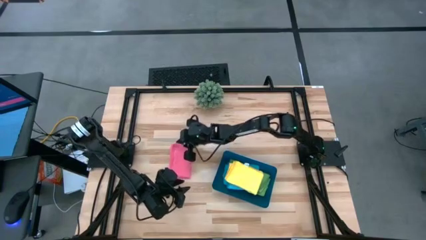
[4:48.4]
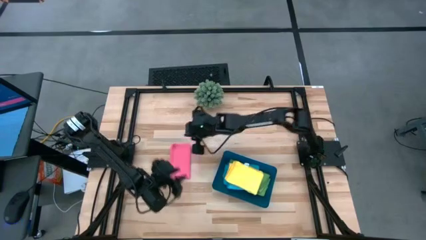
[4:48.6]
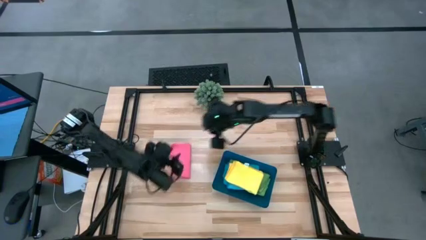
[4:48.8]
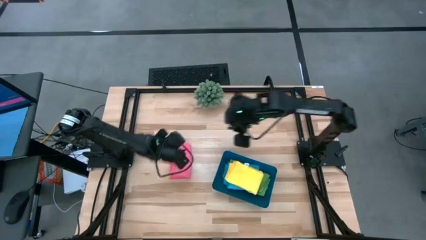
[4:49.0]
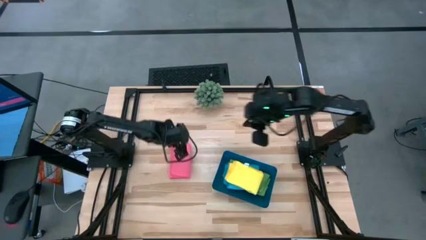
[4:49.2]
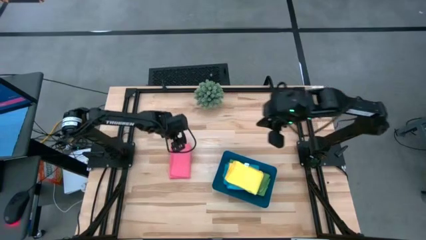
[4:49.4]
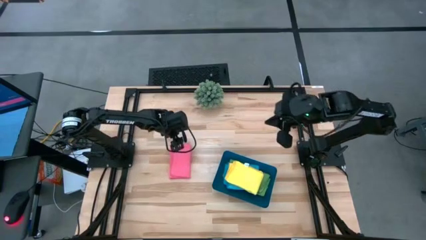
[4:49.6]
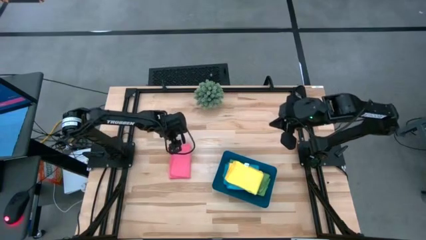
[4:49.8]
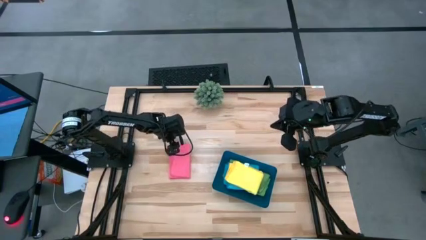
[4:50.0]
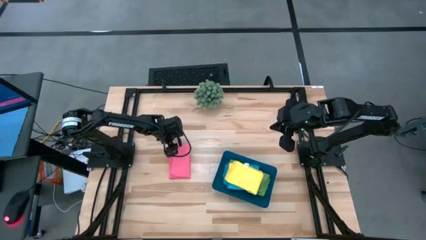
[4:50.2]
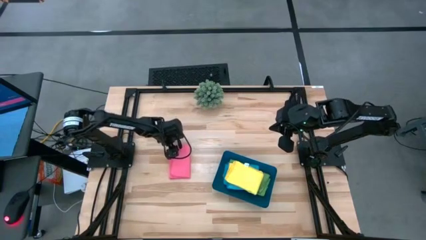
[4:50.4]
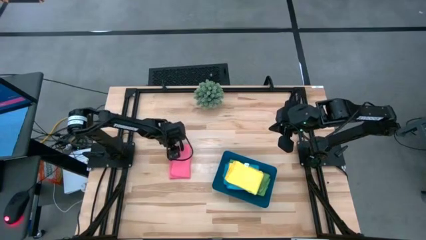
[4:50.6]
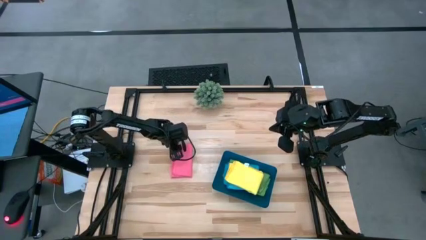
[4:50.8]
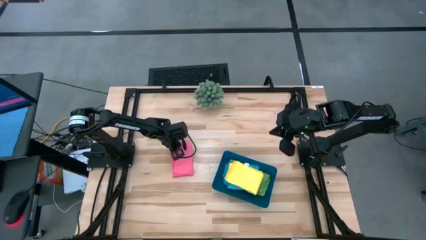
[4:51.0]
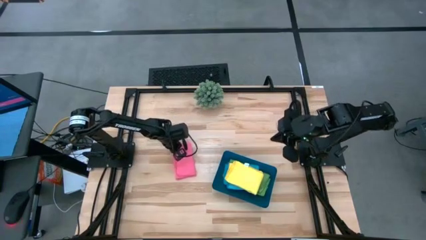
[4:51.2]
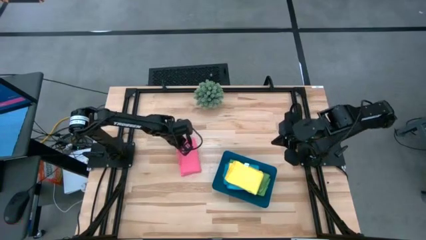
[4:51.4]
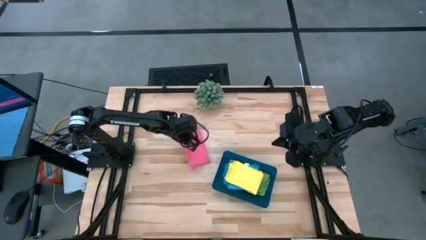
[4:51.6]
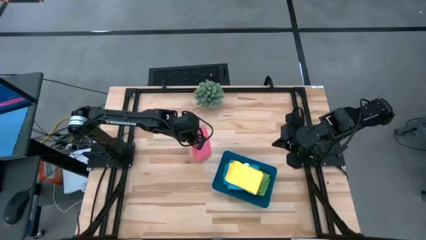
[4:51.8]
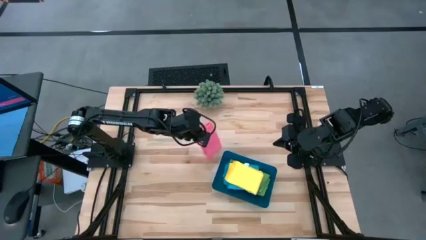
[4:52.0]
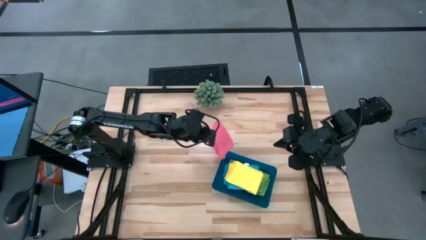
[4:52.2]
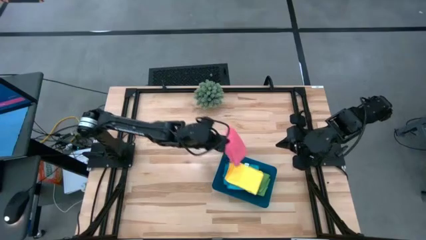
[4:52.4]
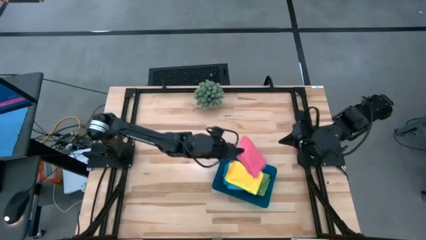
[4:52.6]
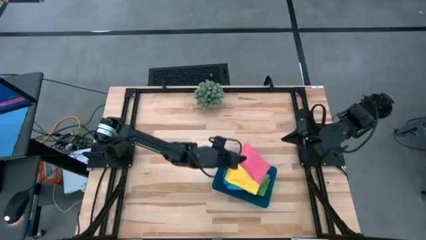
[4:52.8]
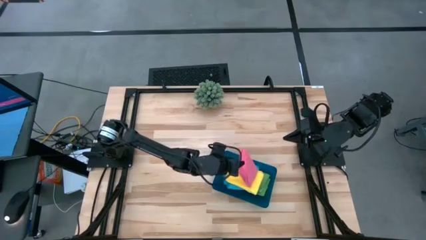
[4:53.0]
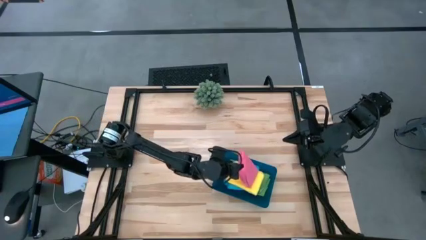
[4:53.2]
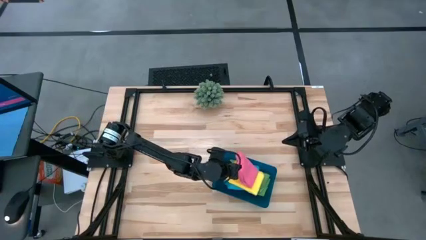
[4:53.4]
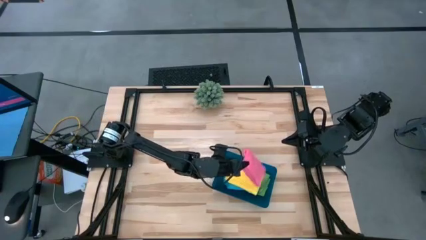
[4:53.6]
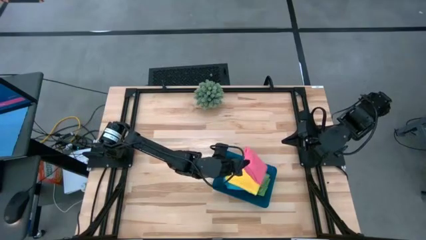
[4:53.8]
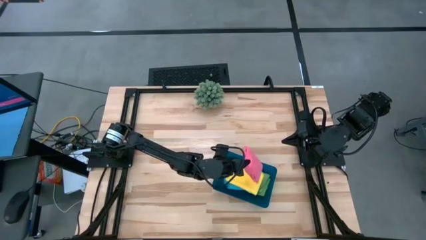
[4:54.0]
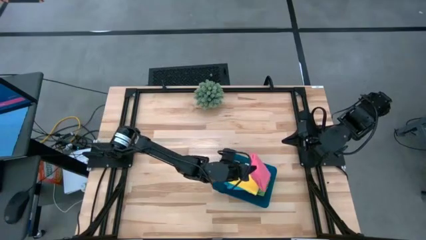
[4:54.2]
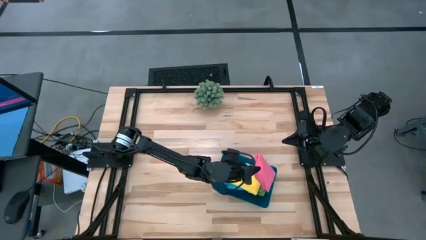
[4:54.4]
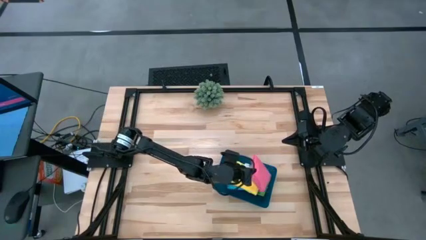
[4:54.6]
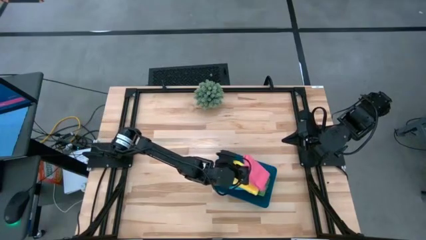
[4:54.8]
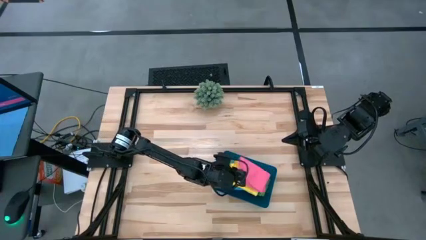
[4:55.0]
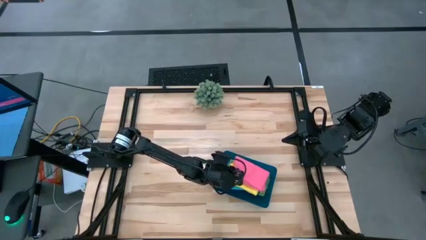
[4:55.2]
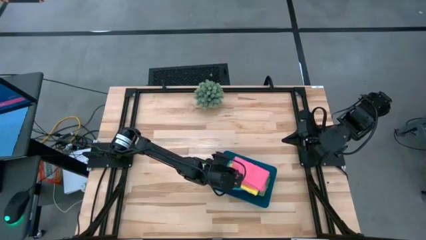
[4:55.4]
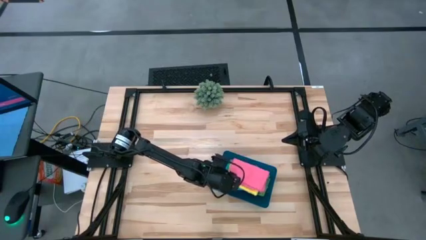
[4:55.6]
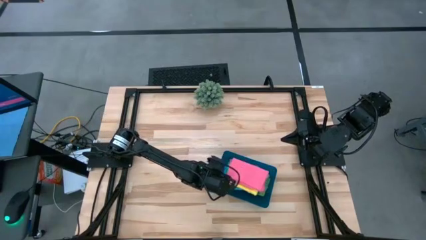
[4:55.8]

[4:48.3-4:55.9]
Task: Fold microfiber towels
Stack the folded pink microfiber cloth into the blue bin

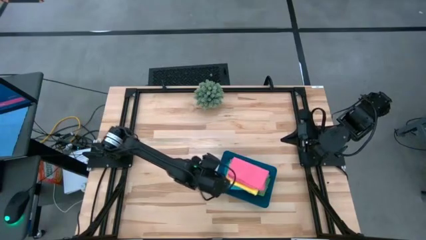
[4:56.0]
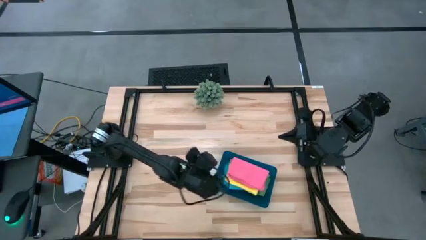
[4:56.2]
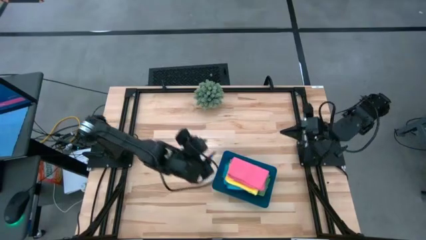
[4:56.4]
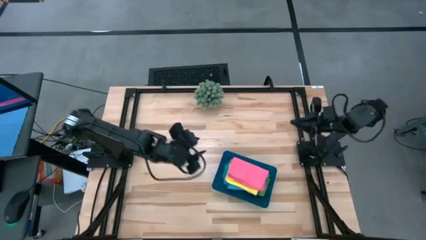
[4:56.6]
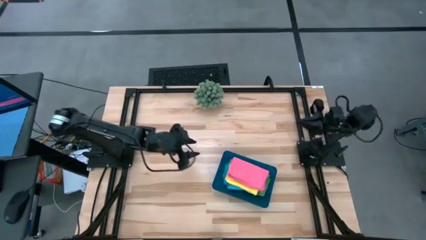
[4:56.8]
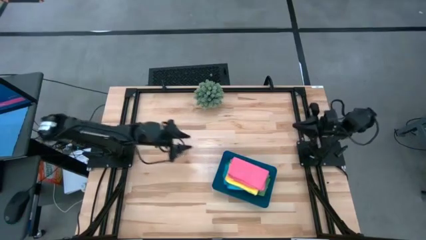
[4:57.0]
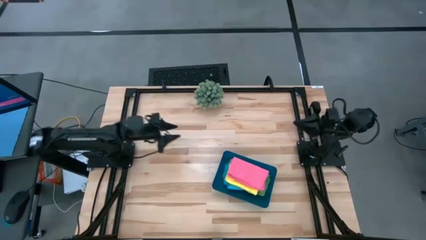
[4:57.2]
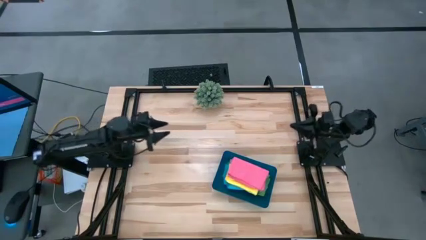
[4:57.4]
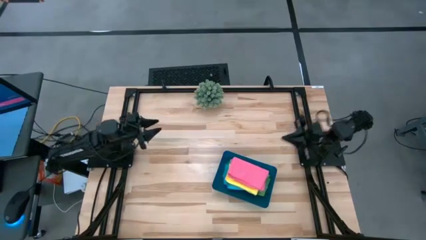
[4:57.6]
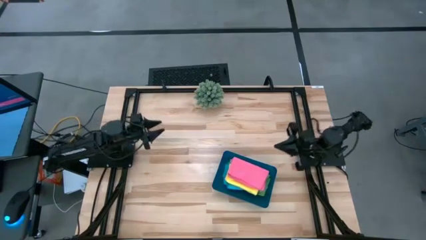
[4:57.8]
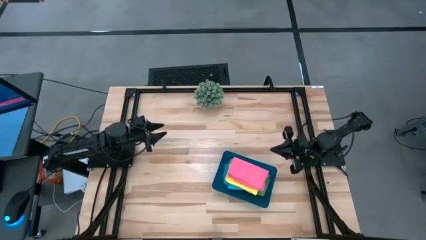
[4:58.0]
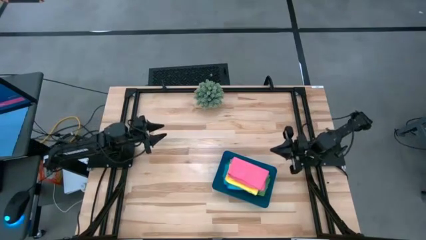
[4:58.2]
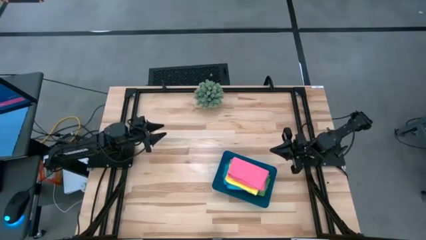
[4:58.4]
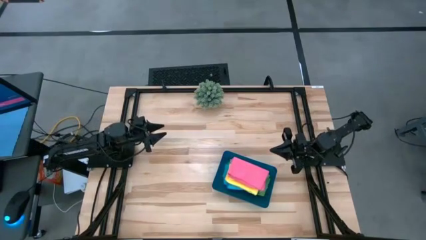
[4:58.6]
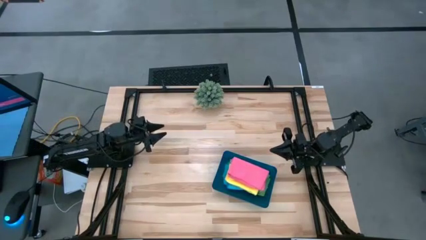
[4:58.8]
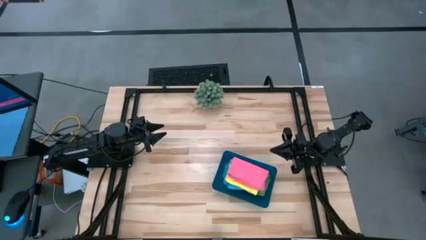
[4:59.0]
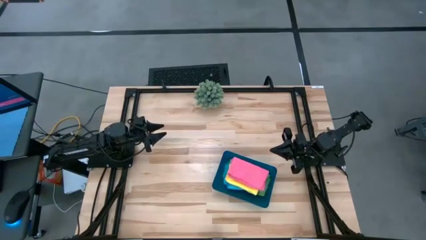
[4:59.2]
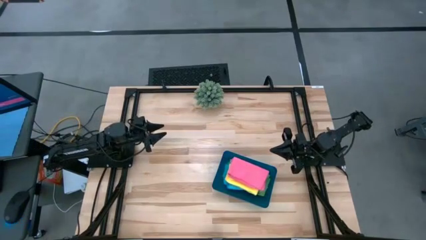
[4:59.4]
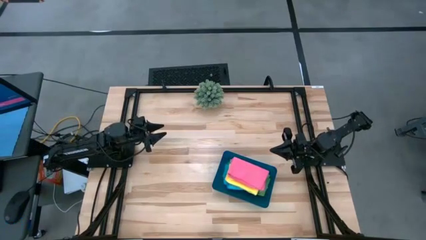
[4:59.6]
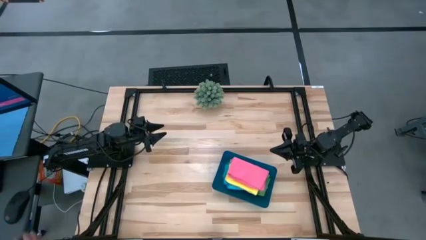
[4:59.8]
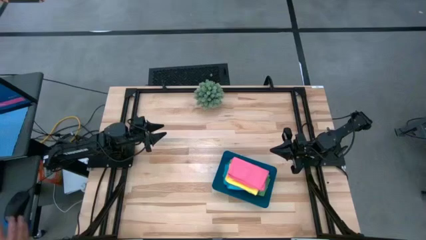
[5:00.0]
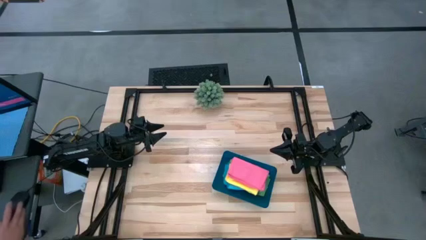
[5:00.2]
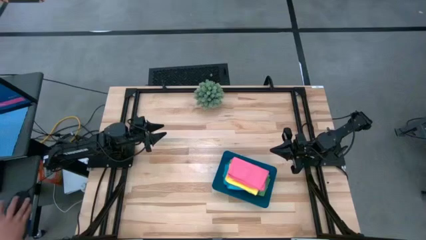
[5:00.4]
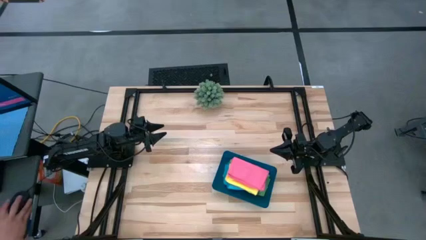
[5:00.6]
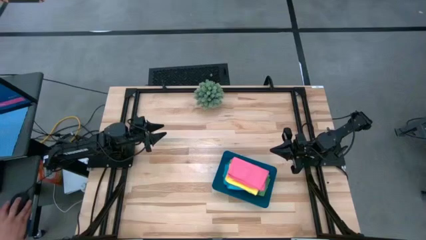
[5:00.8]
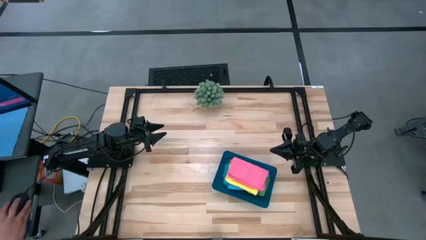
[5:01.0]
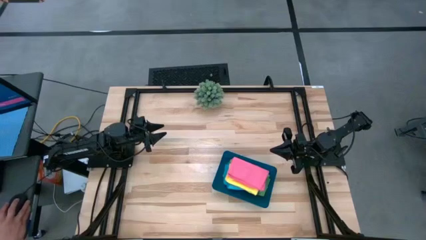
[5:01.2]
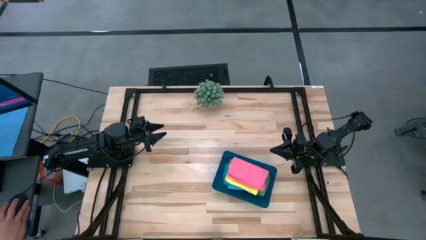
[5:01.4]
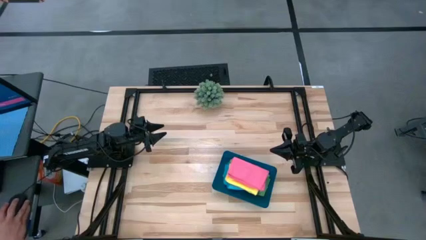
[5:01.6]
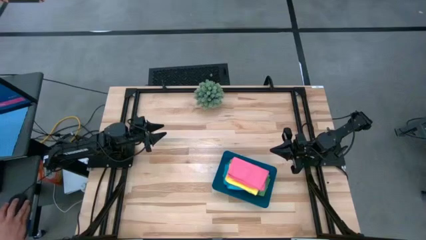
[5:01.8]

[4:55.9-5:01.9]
Return to Home Position

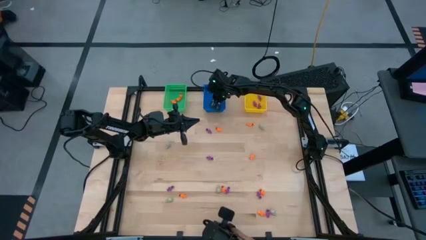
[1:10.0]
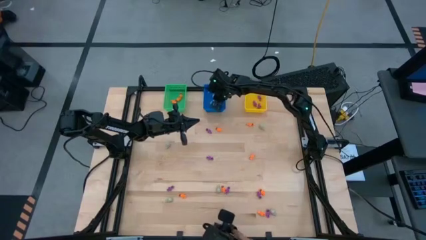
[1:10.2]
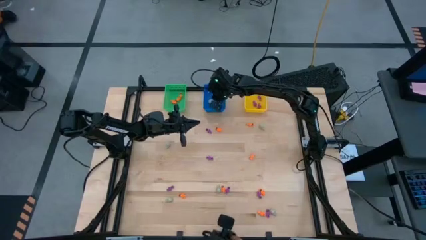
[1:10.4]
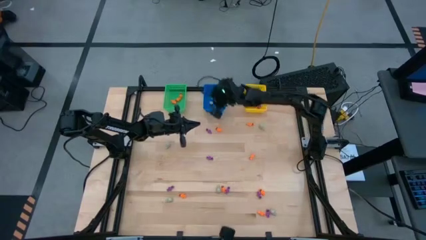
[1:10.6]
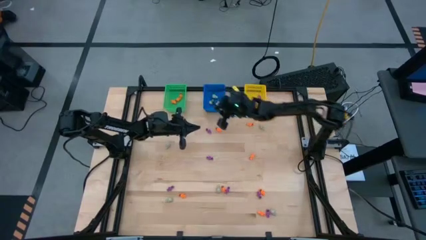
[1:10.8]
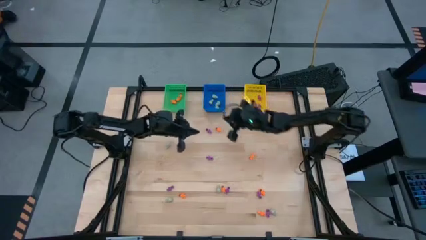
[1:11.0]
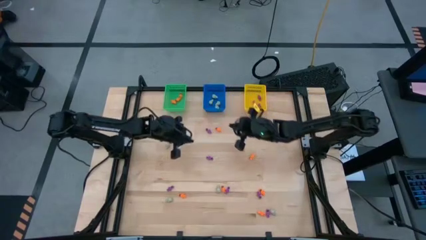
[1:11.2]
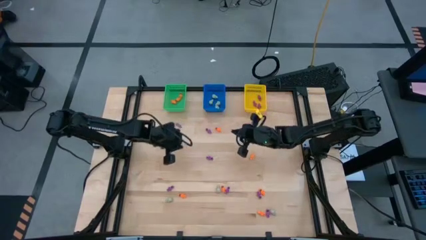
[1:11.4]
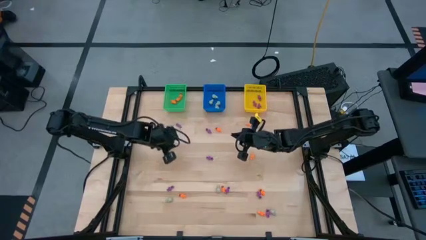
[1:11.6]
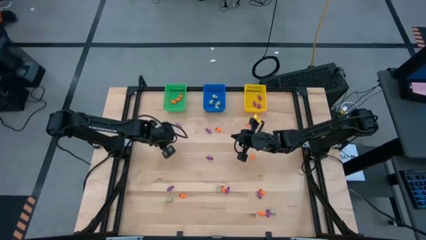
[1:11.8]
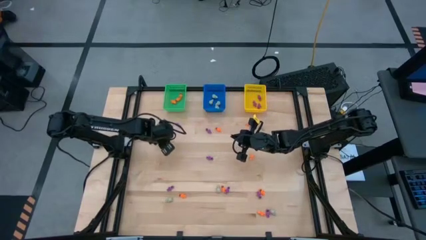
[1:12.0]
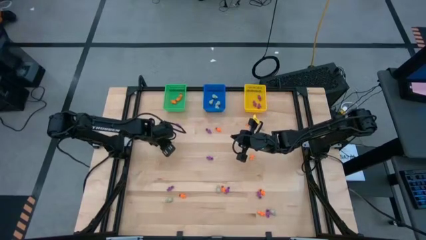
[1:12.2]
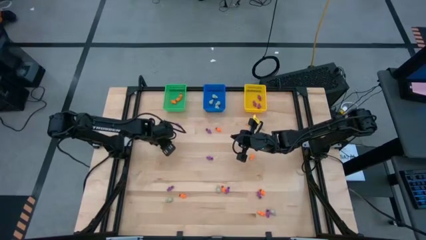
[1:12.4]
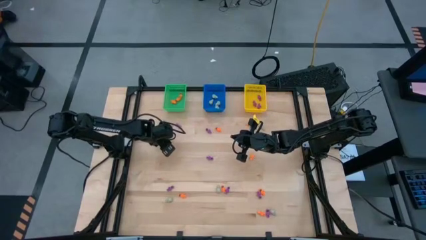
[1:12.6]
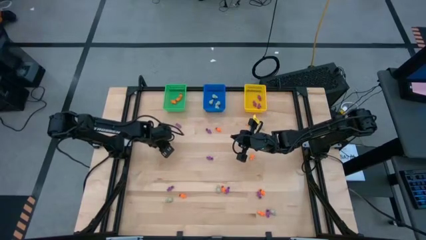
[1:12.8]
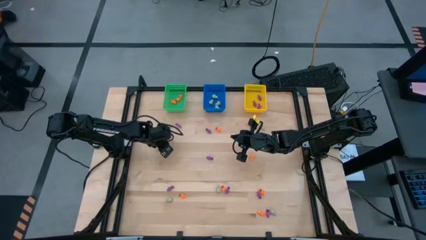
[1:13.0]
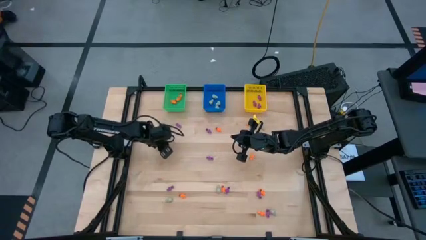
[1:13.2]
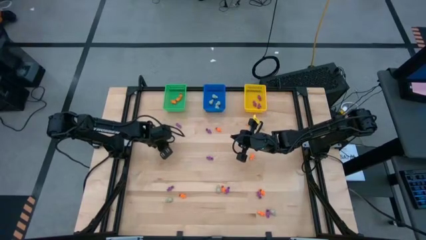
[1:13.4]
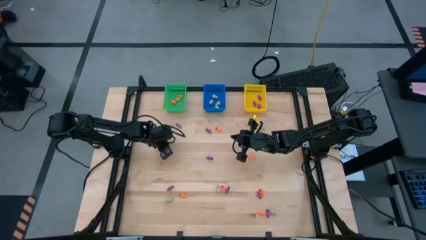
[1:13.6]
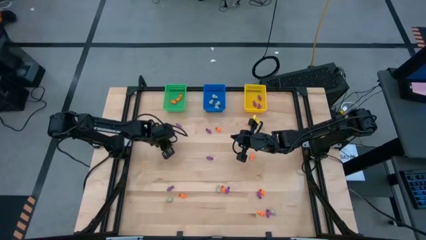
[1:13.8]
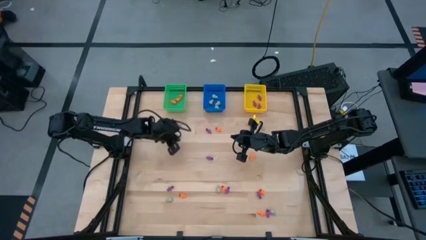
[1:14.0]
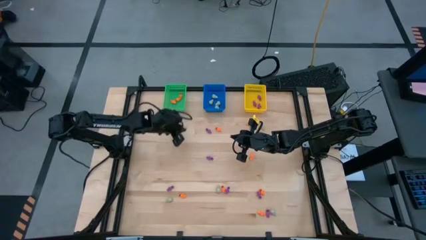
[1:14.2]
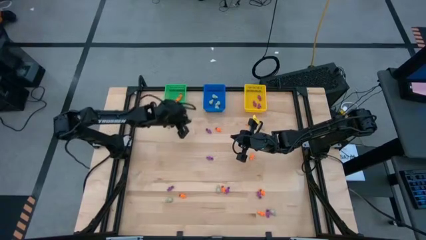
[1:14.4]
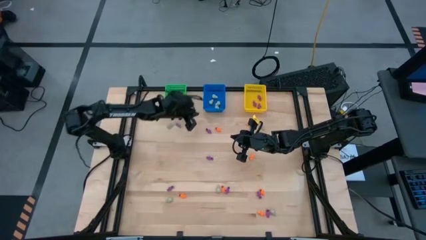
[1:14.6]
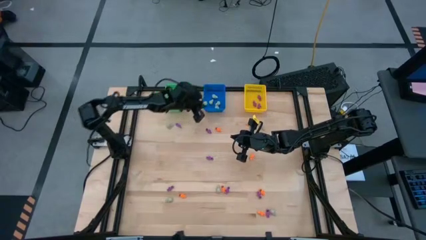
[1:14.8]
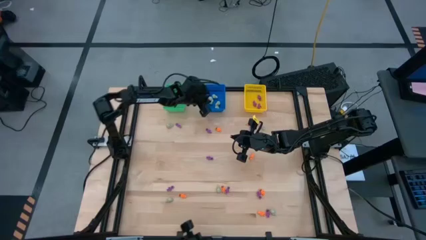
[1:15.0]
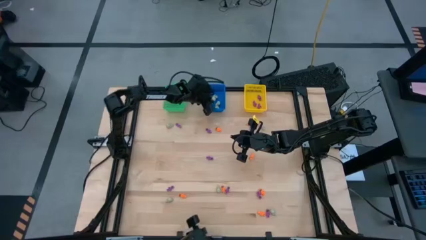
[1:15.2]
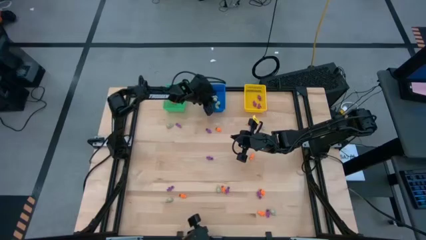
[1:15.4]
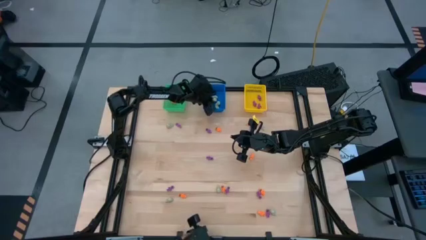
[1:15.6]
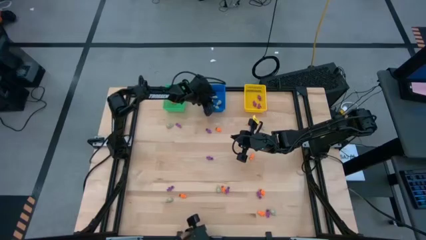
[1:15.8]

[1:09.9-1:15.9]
Task: Sort Halloween decoration
Put the white skull toy into the blue bin
